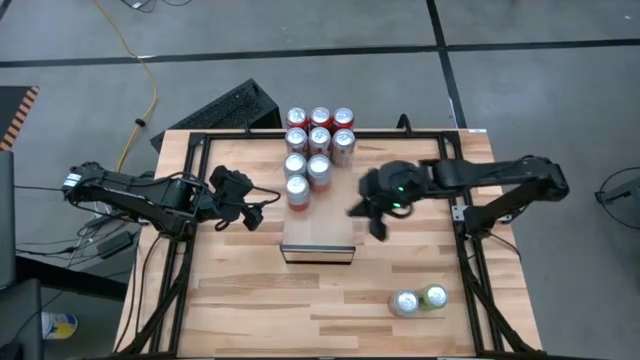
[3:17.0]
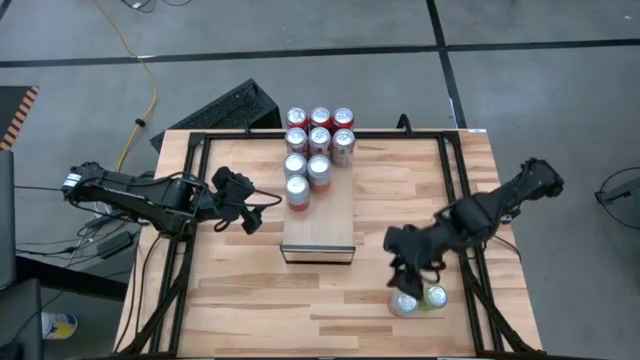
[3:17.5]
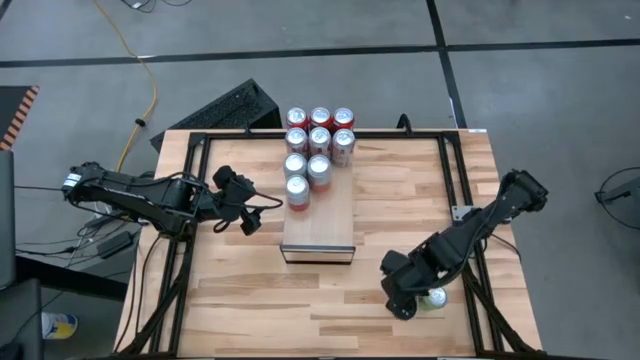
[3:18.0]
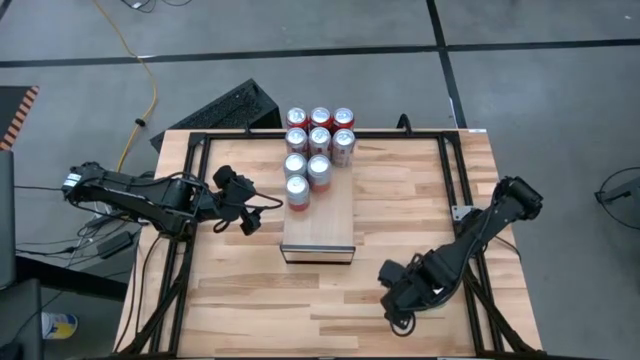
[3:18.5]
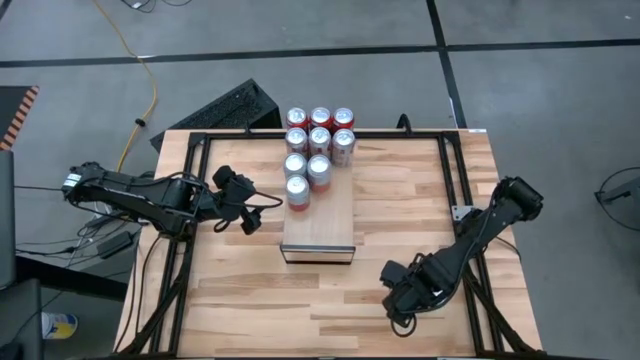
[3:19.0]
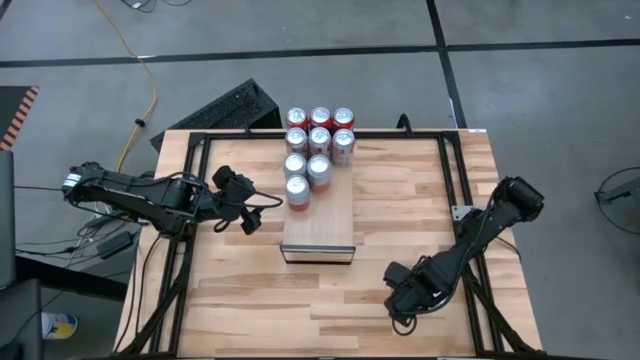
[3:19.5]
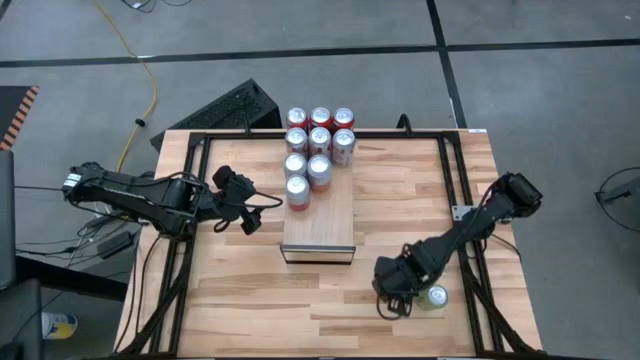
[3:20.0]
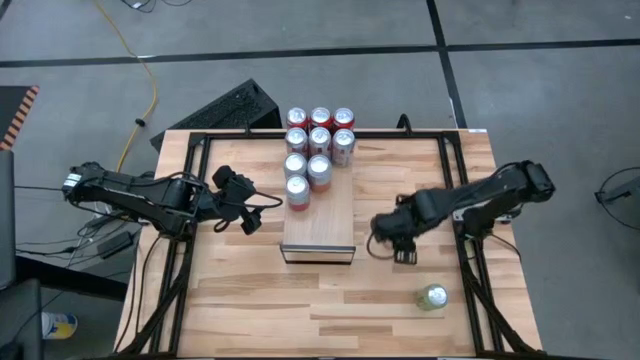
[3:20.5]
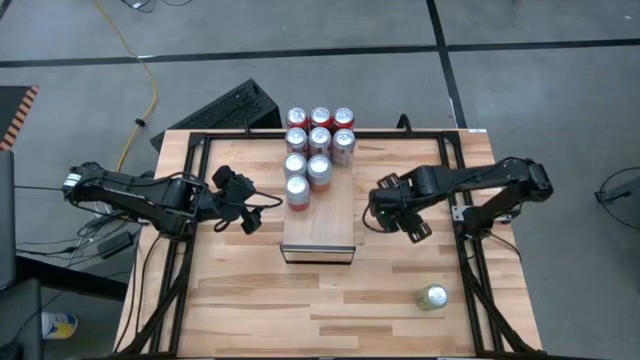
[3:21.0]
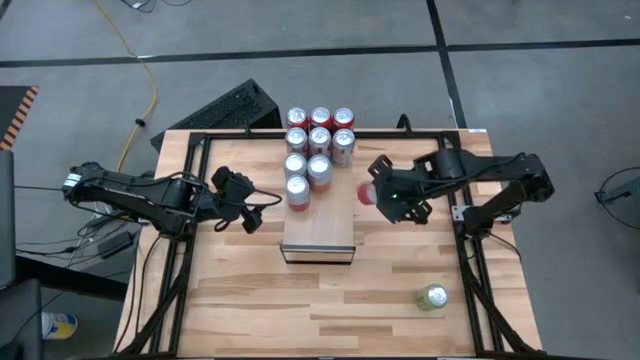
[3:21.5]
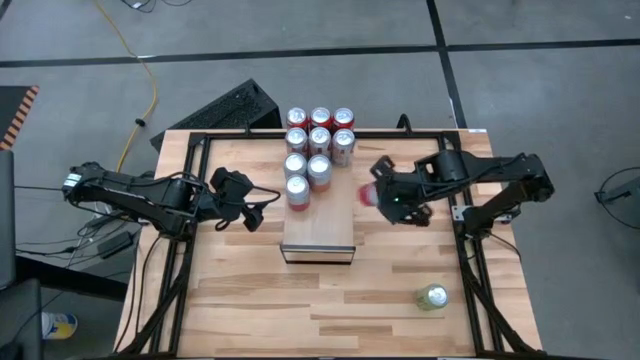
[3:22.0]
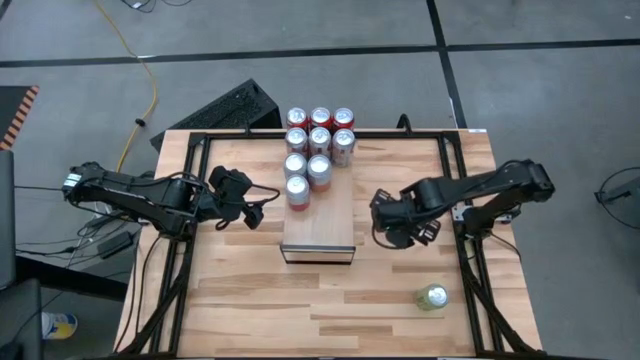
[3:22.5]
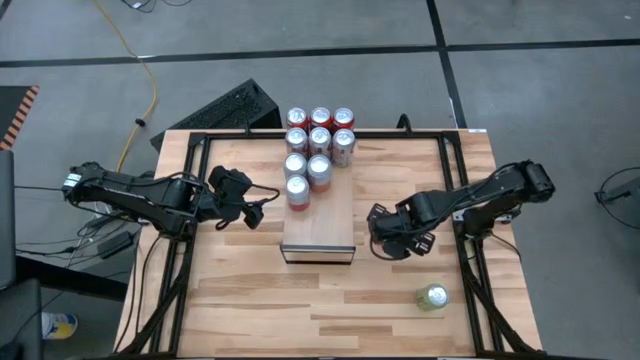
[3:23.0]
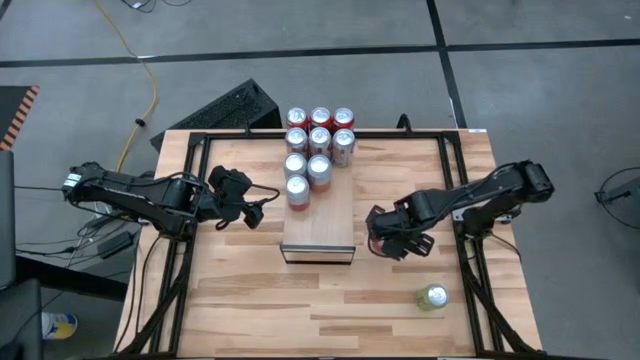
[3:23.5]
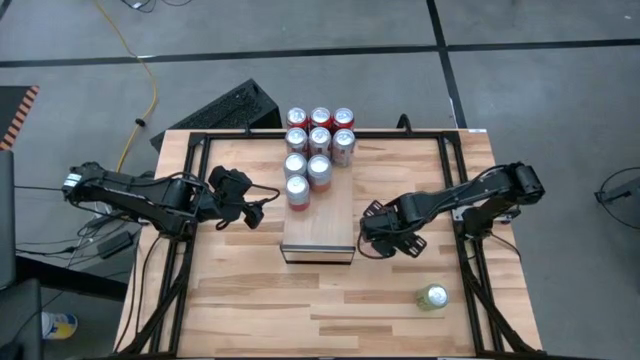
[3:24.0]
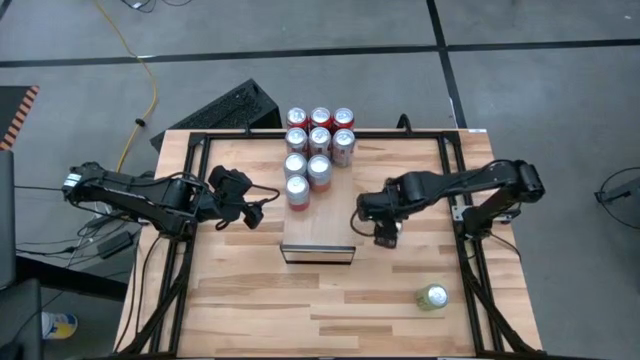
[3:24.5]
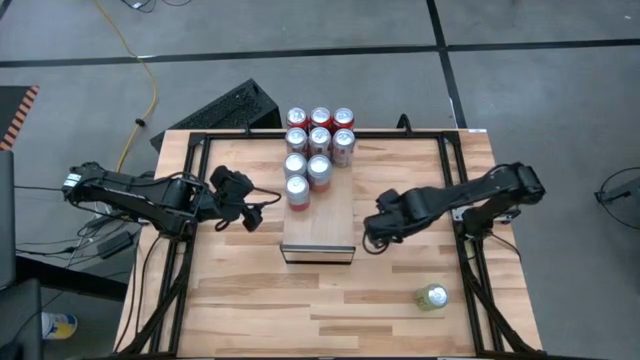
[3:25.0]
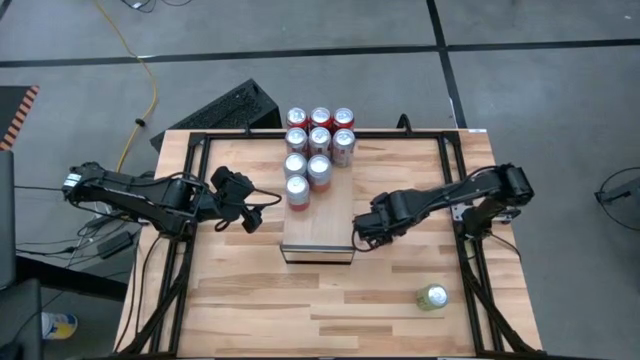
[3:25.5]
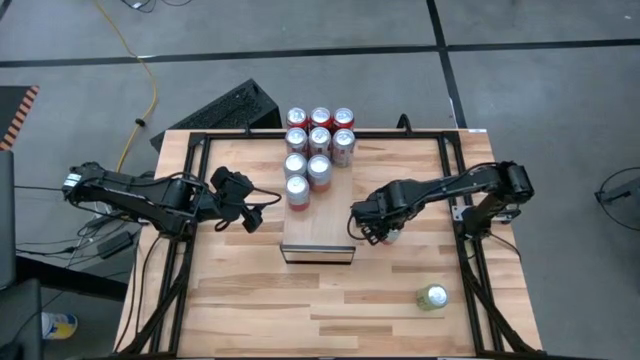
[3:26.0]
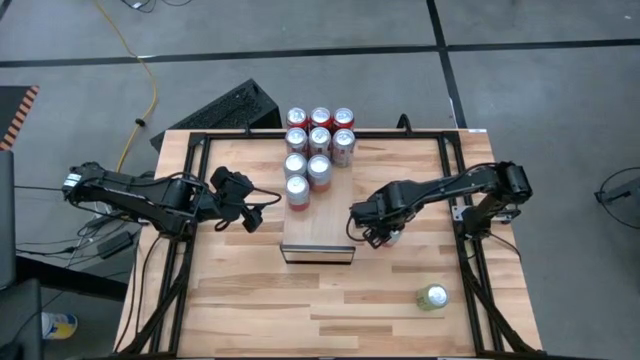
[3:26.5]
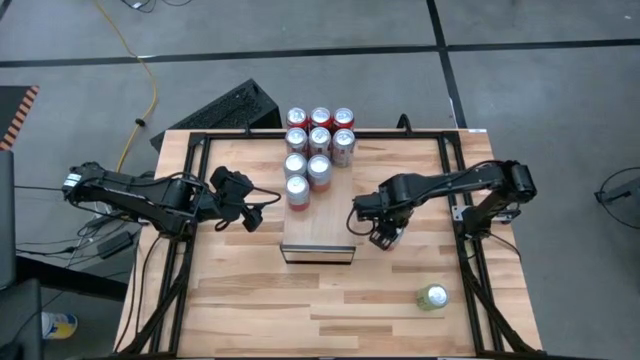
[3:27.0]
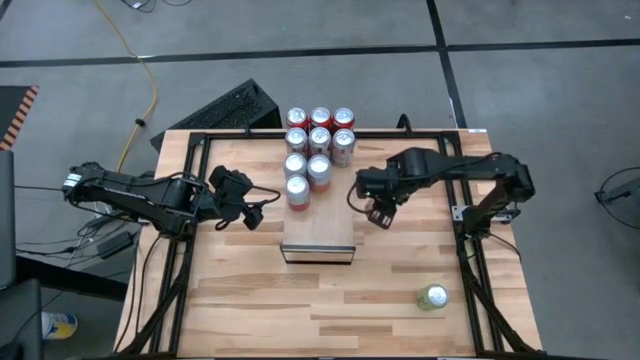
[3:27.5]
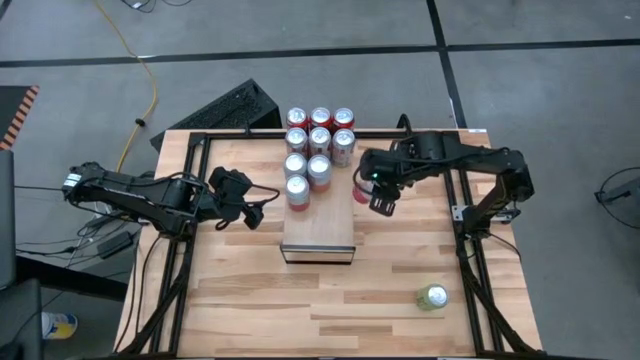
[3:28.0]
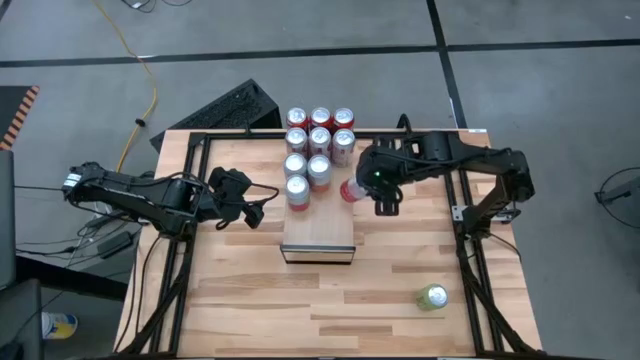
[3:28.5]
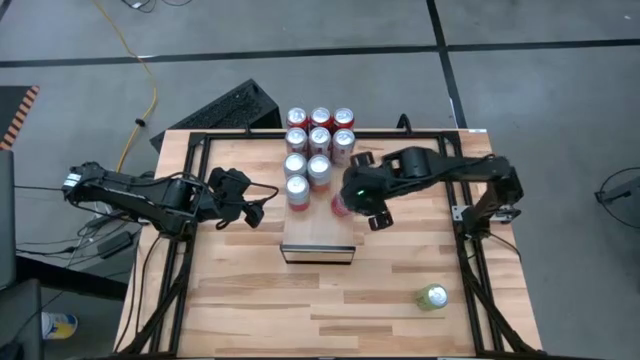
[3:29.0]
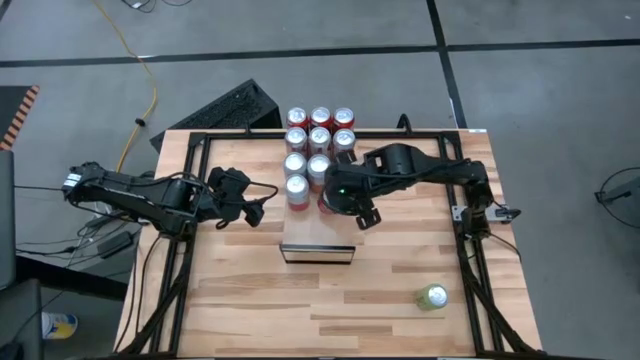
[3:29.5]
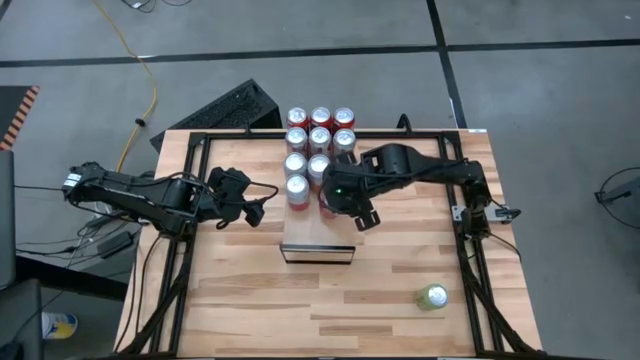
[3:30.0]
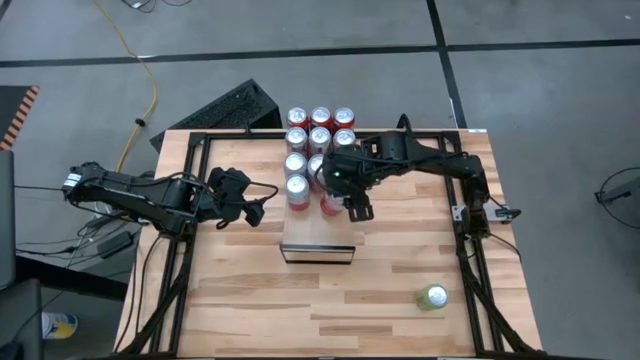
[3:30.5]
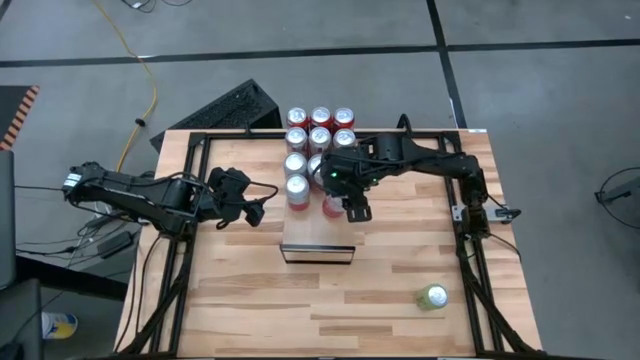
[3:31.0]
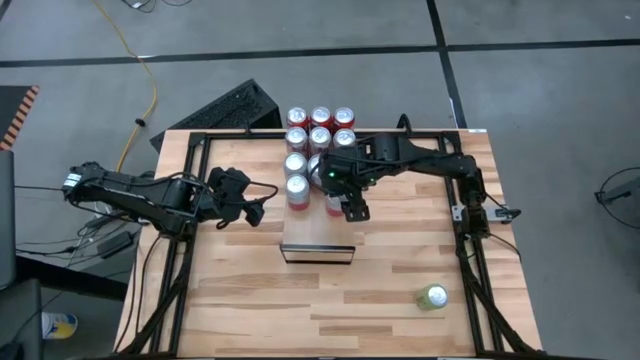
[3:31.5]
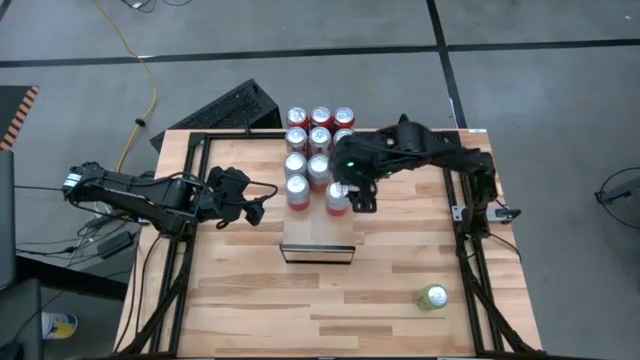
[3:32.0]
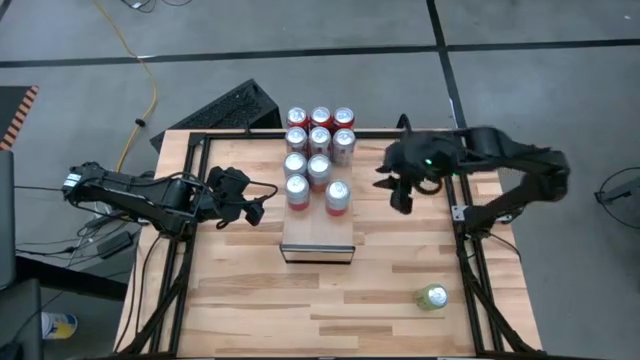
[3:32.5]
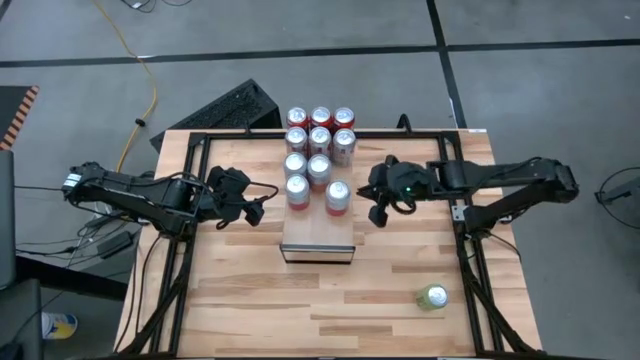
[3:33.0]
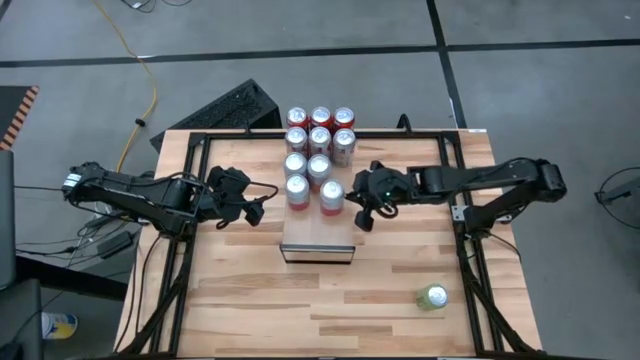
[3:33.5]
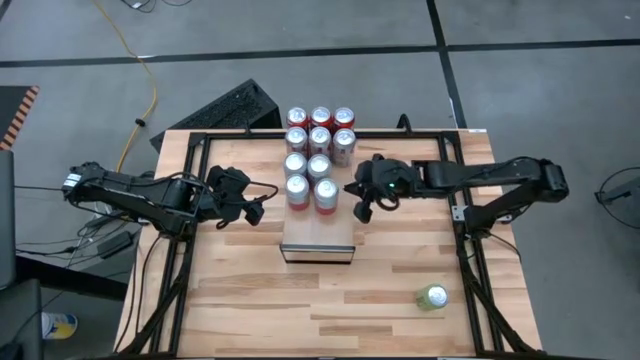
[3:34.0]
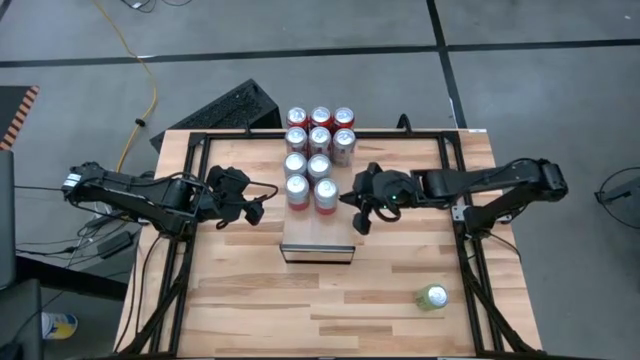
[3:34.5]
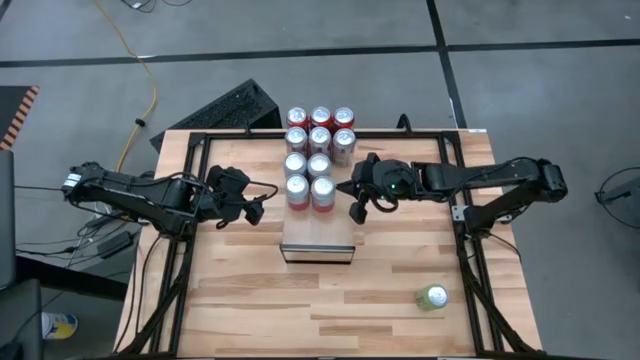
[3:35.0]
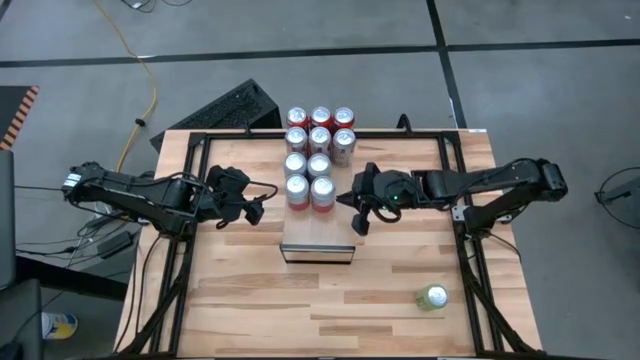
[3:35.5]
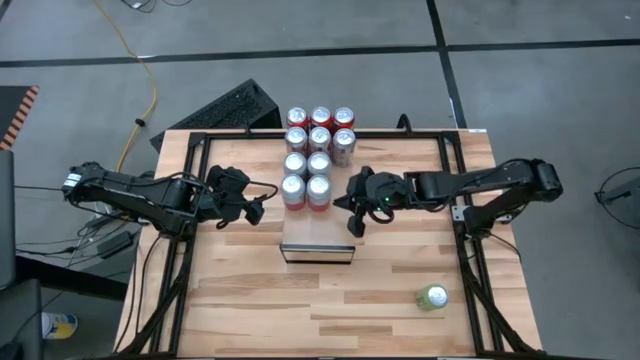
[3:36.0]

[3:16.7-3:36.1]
Task: Place canned beverage on shelf
Put the pink-white soda can on the shelf aligned with the other pink-white soda can

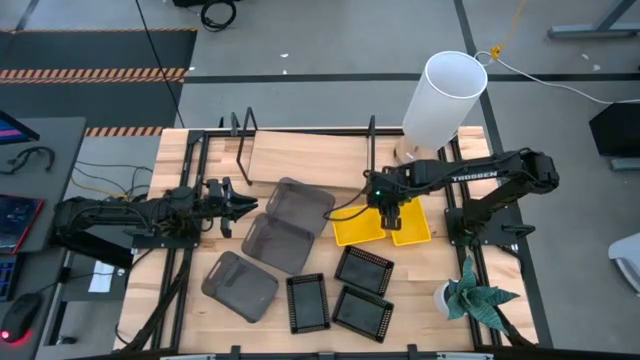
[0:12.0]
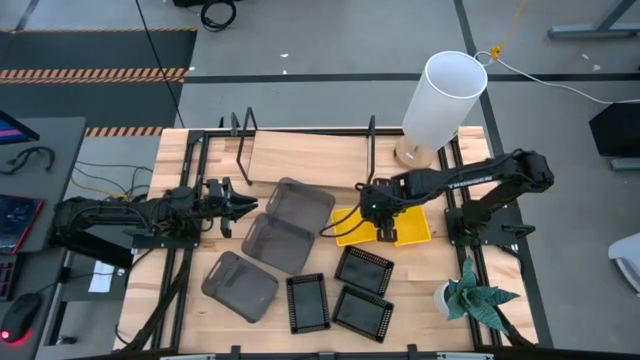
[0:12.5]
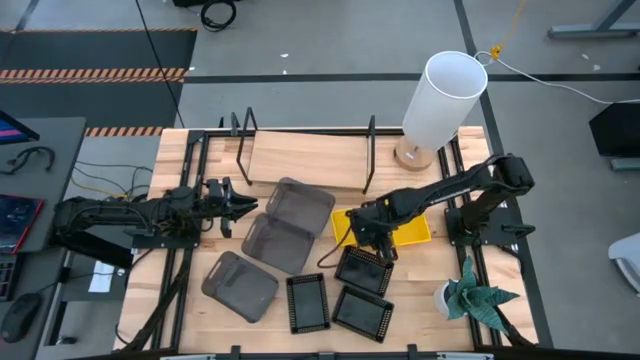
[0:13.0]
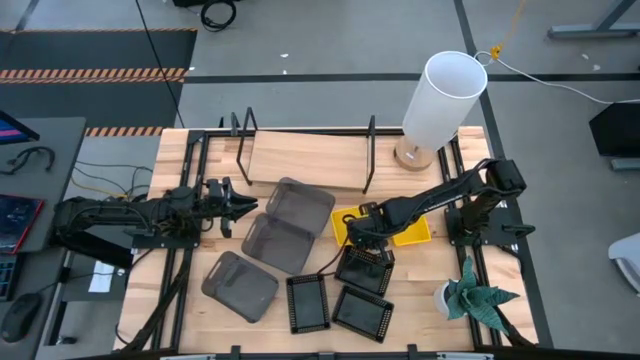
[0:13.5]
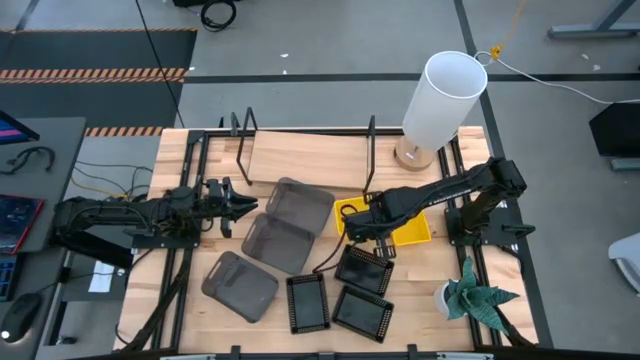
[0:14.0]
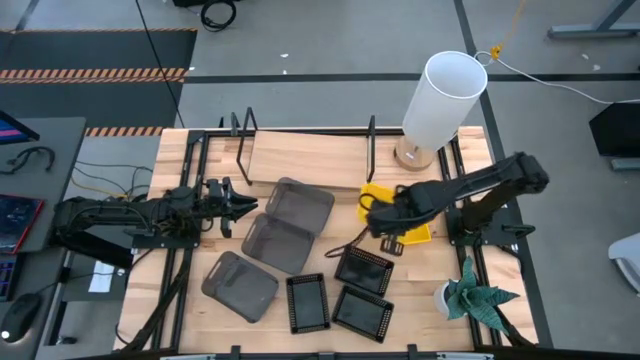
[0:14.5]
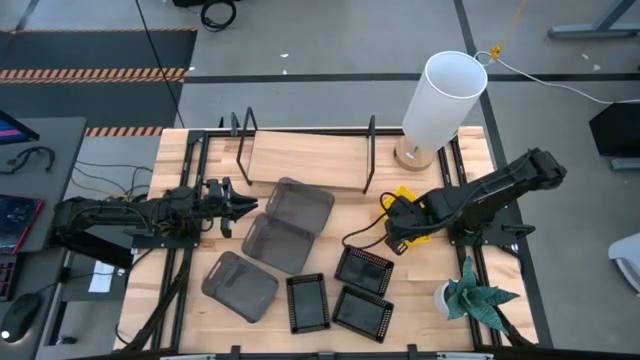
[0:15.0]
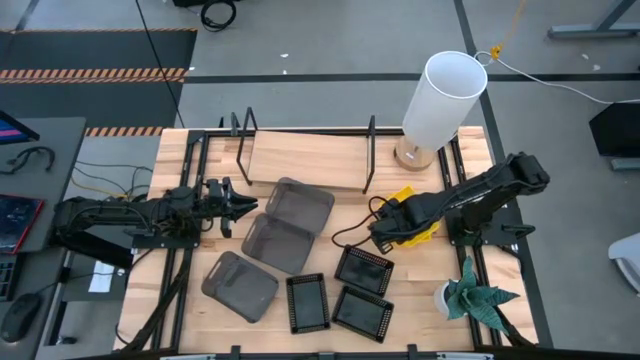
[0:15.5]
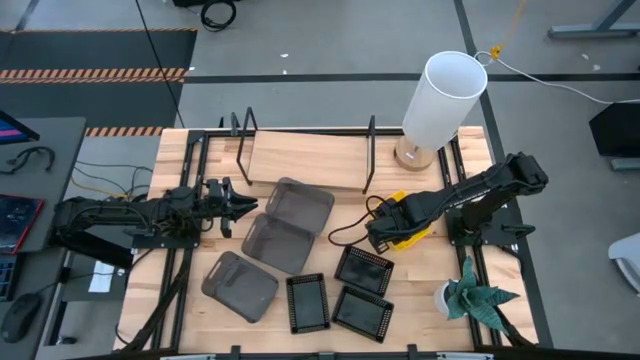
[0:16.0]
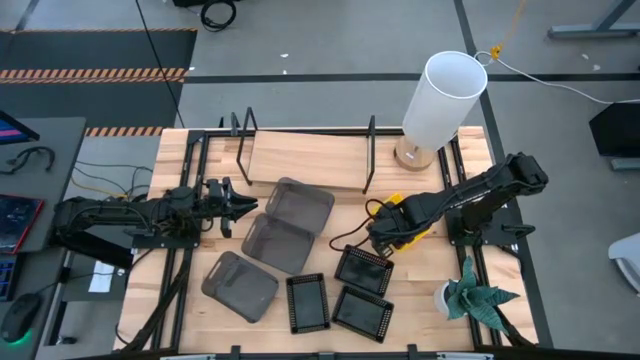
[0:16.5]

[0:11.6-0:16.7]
Task: Stack baskets on shelf by color
Stack the left yellow basket on the right yellow baskets
